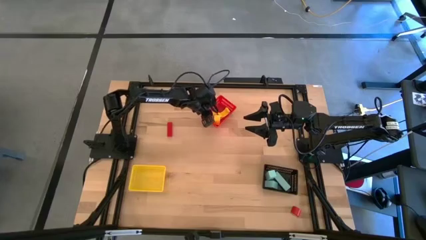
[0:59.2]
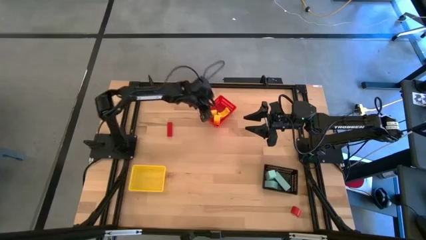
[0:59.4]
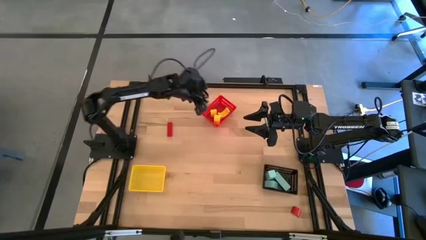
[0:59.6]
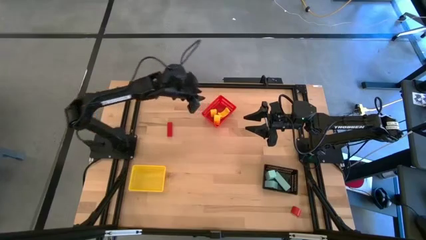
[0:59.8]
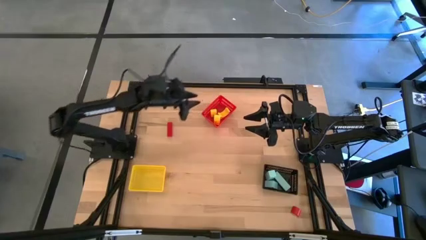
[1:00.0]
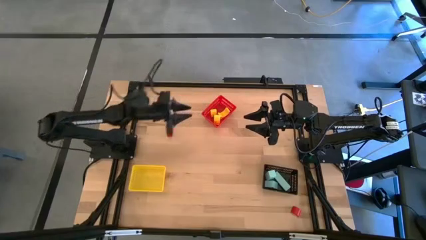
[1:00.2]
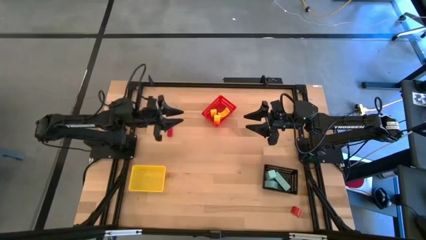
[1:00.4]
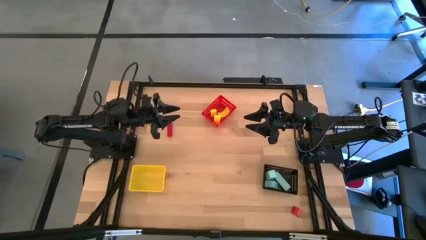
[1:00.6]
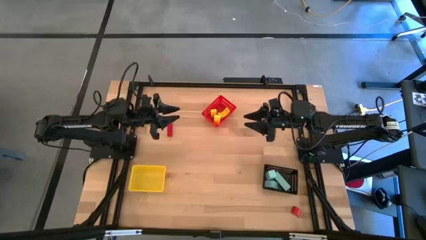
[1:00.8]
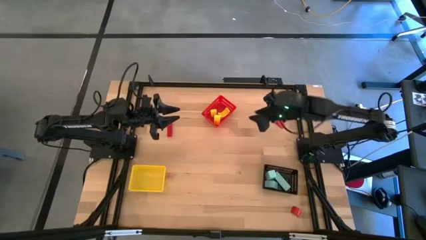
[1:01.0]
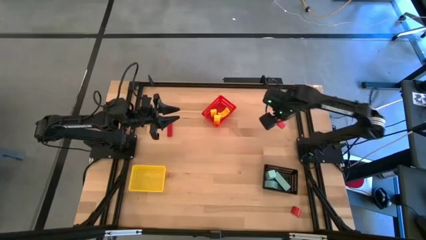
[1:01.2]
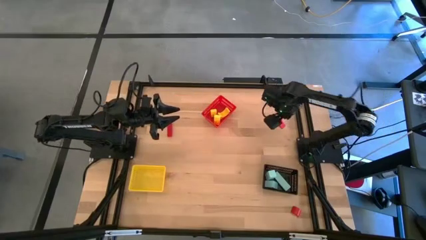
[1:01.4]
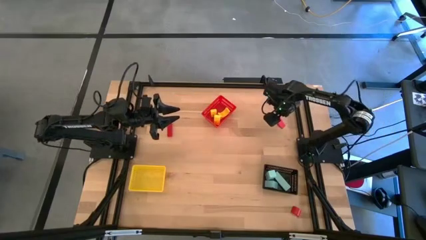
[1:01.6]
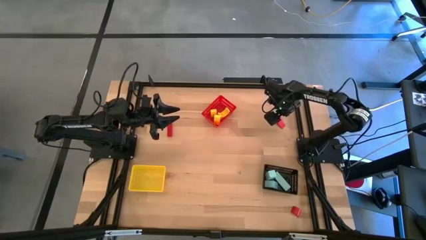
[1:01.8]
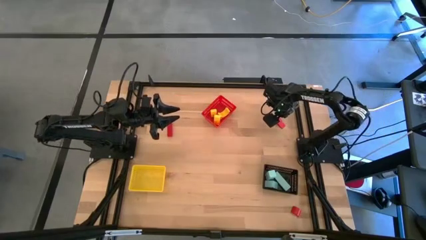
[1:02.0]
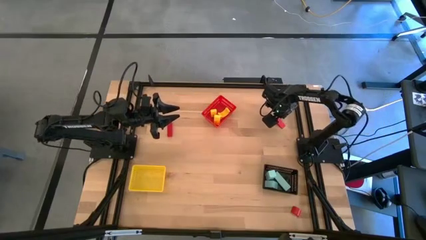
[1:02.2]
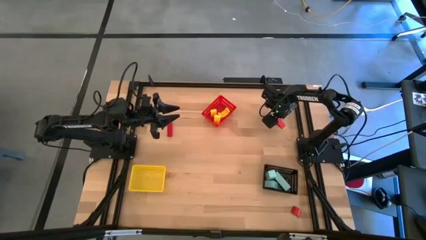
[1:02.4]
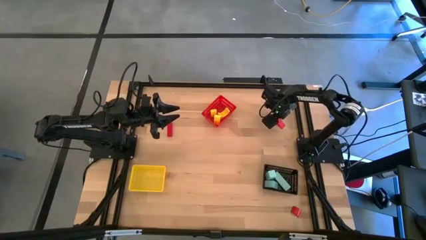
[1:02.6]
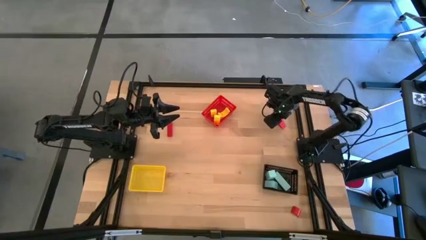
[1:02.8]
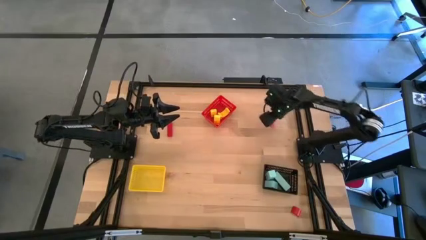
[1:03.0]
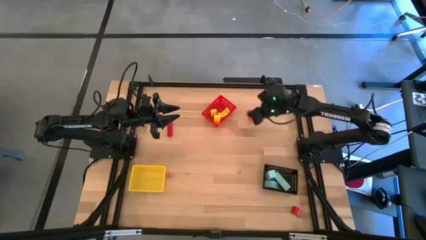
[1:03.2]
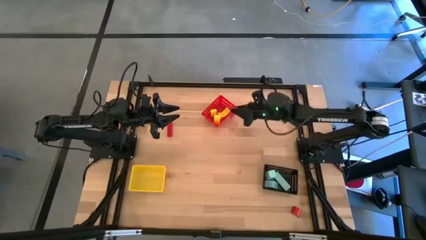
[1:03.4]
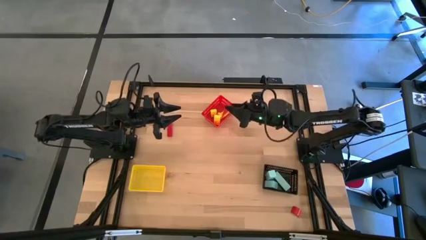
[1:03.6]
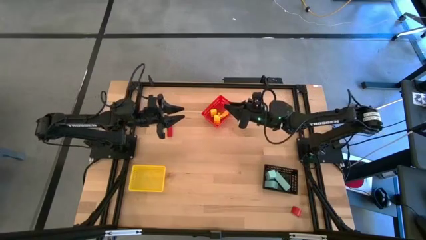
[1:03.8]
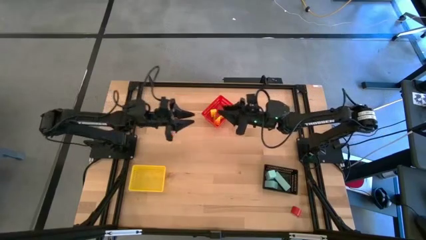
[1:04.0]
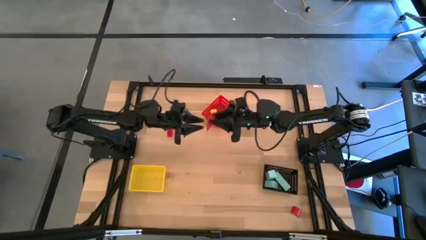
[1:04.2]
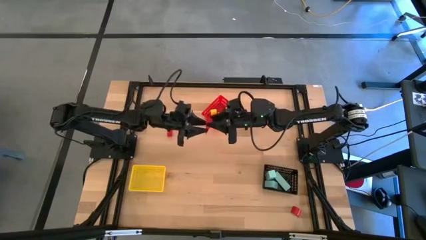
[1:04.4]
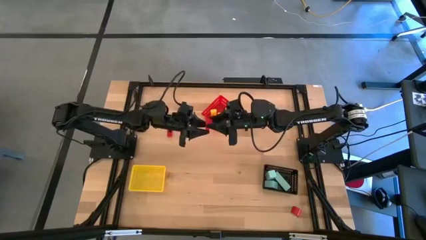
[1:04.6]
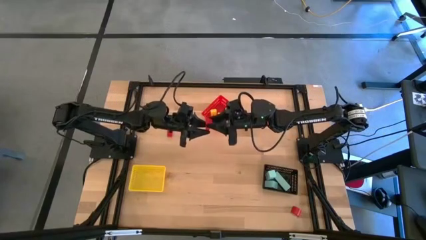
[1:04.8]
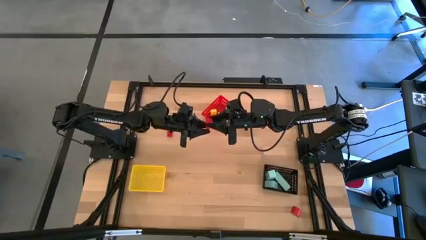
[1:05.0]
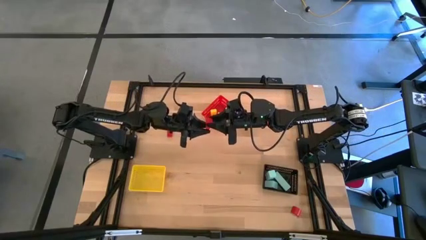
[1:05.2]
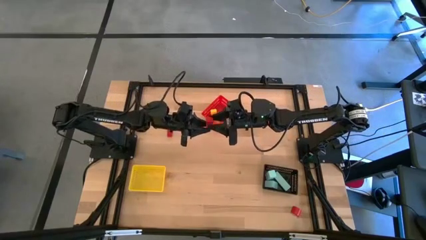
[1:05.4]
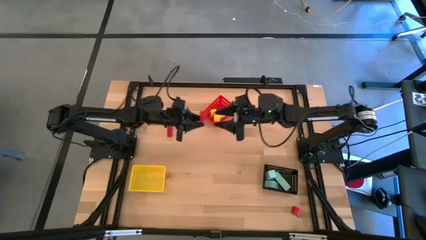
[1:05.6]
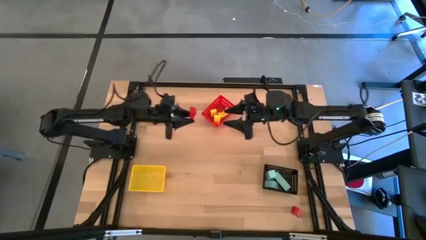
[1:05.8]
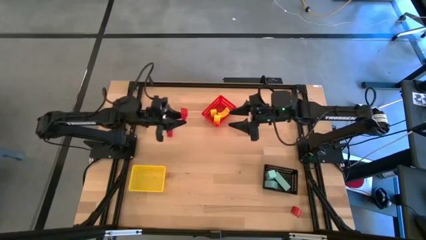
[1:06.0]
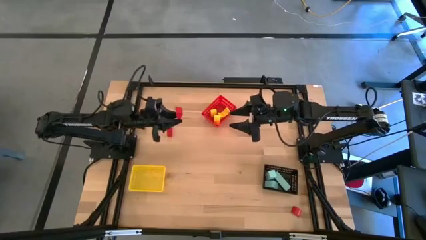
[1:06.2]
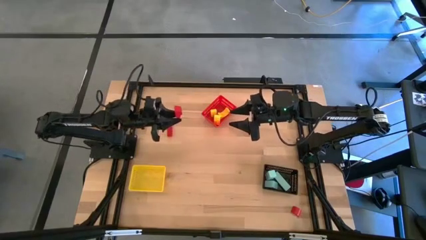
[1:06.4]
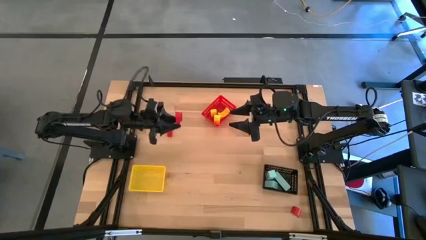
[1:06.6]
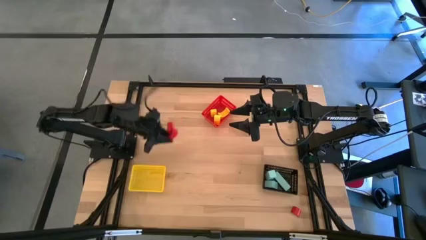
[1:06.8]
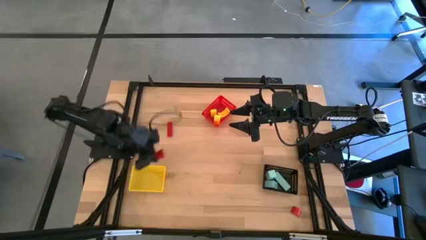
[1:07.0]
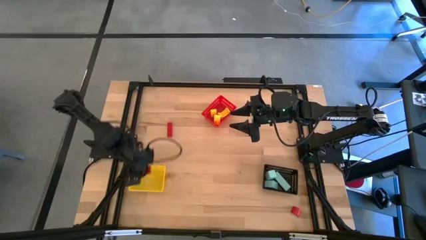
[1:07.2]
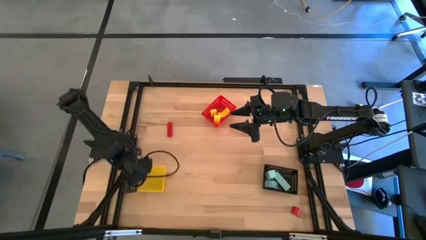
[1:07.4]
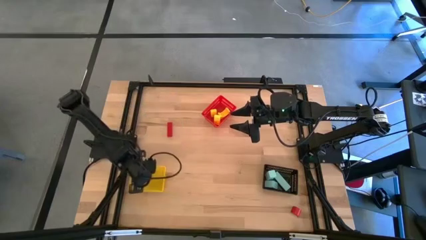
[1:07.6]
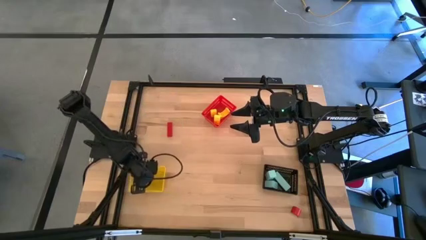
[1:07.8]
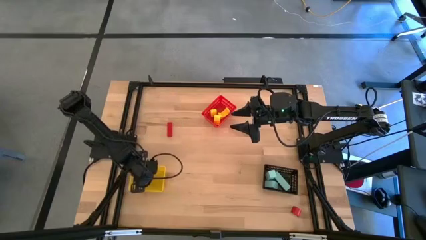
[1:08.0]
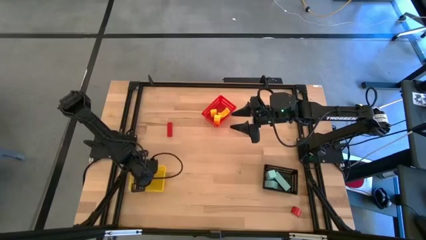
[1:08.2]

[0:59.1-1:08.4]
Task: Sort & place blocks by color
Put the top right red block into the yellow bin

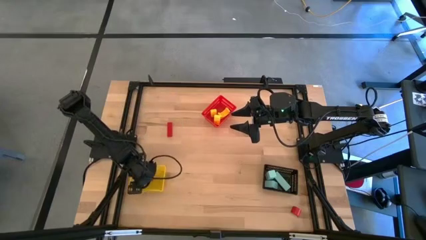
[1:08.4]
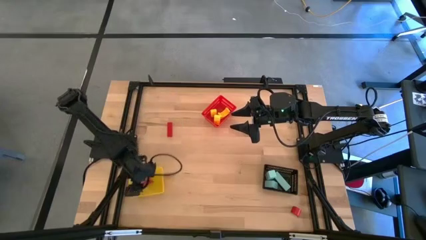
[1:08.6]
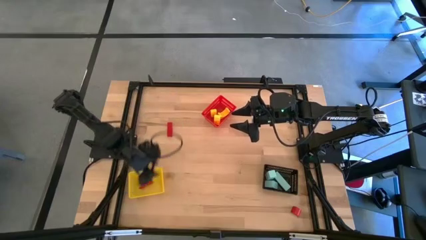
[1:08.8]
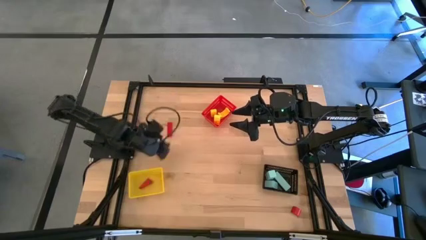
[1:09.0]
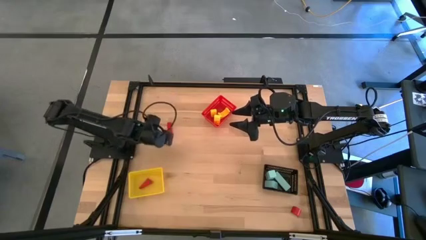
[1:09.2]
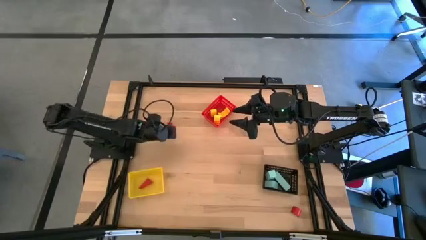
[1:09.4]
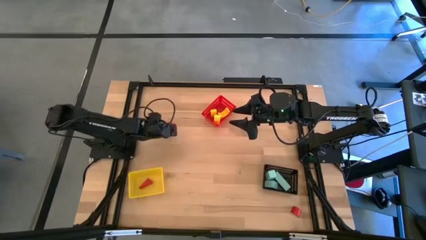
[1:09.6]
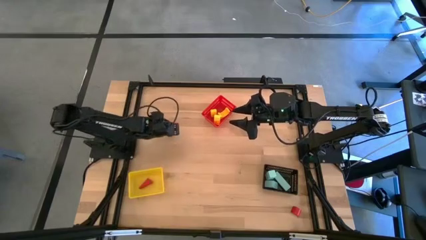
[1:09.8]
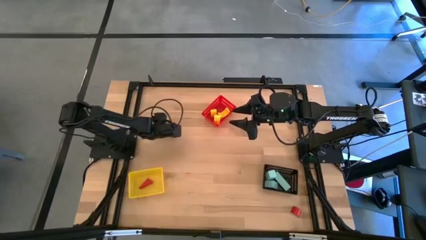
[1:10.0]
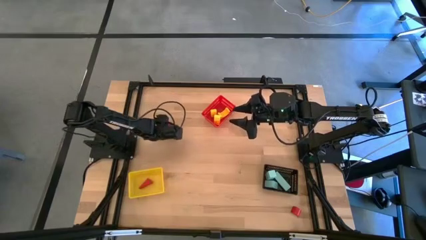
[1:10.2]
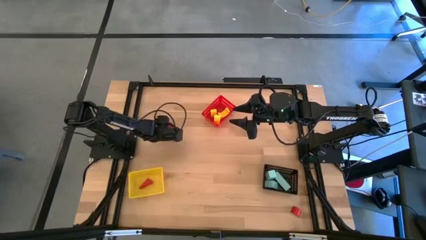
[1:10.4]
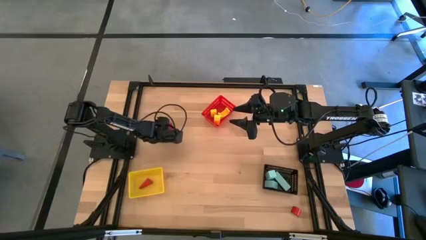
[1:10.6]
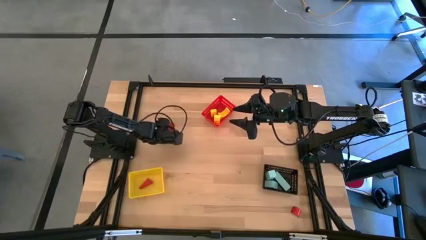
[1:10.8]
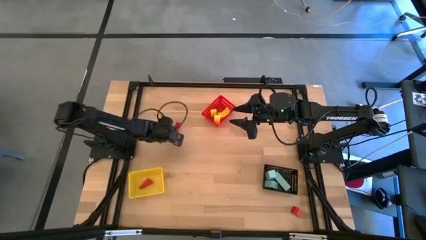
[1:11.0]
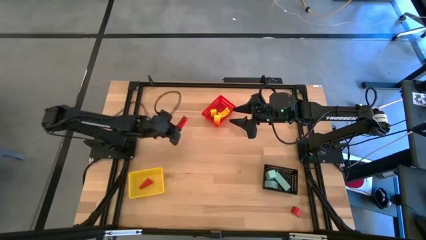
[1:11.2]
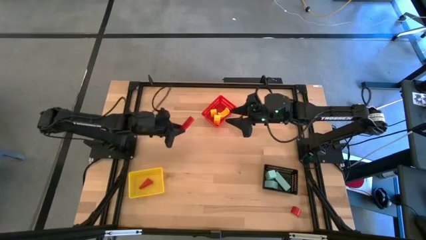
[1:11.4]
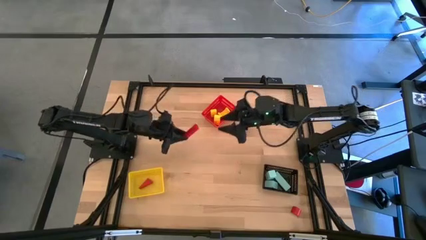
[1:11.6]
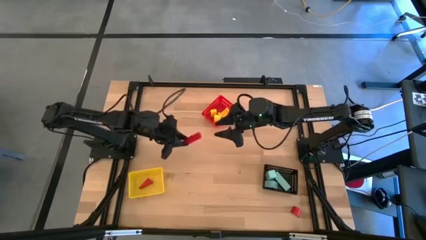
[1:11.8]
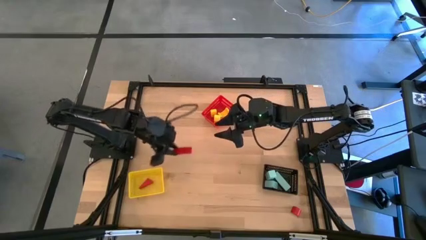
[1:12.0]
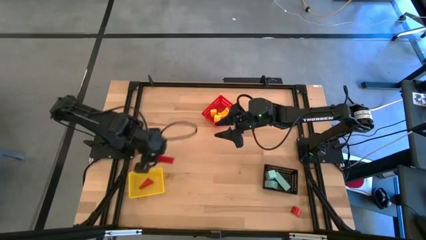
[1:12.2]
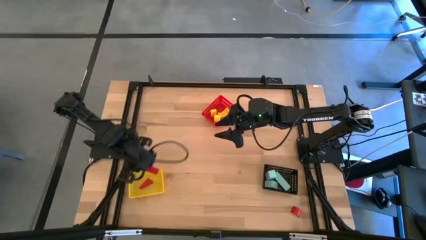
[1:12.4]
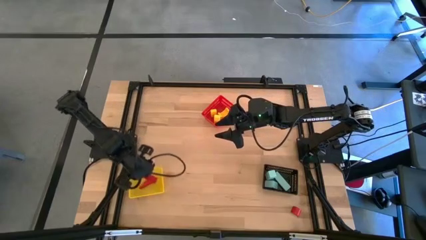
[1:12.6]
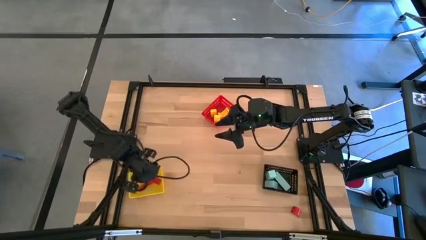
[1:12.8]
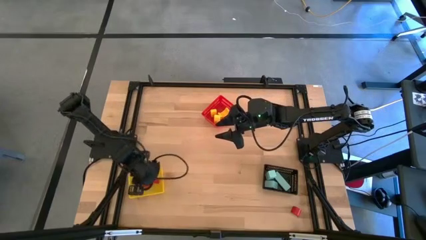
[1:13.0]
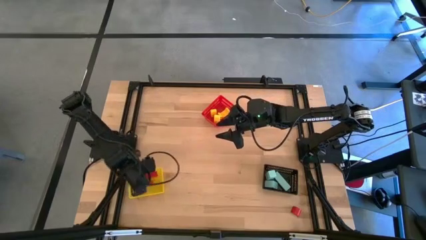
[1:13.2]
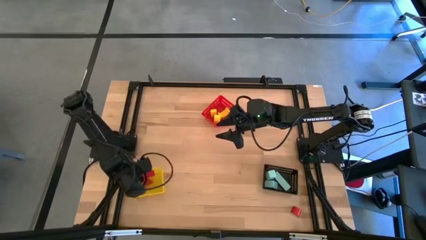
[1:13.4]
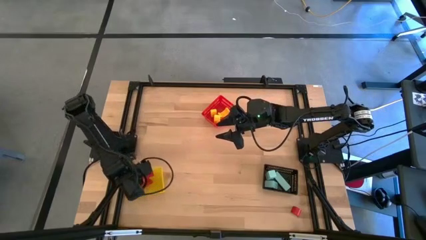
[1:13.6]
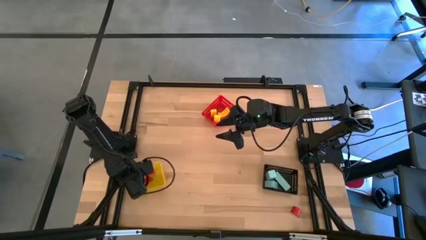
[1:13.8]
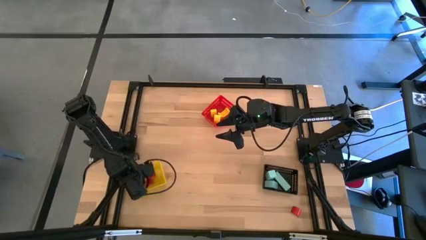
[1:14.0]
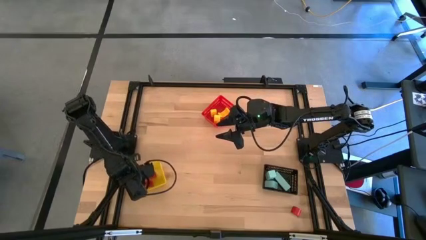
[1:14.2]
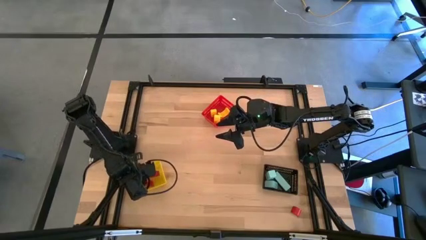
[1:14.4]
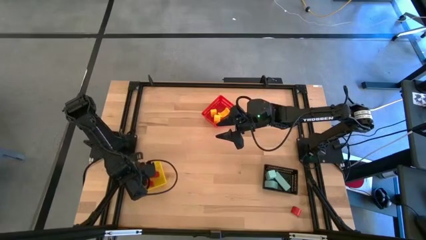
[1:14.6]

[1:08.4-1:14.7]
Put the top red block into the yellow bin

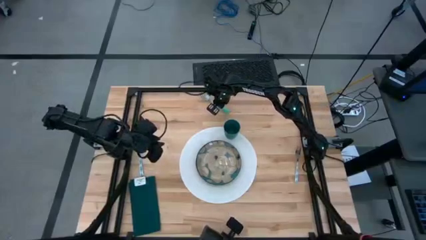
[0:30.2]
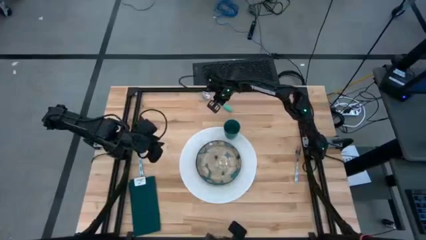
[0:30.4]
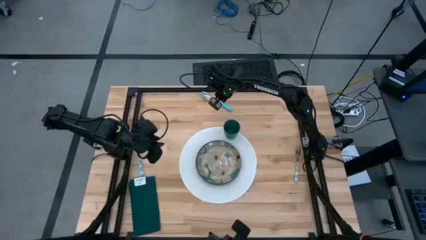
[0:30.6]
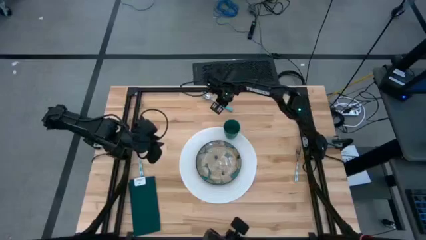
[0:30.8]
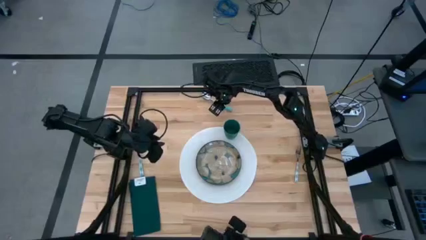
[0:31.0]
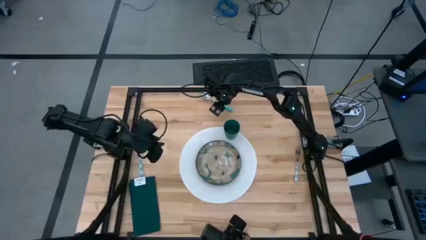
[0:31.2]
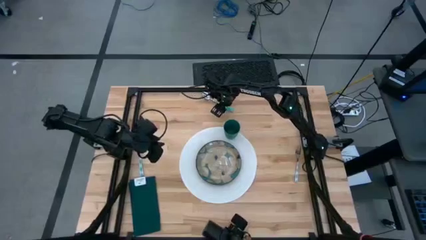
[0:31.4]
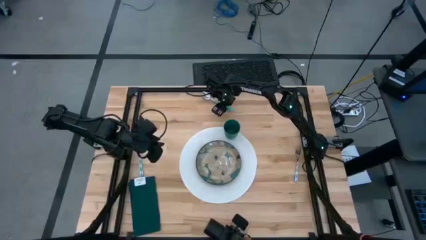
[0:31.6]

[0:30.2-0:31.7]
Task: Set table place
Put the blue spoon on the right side of the white table mat

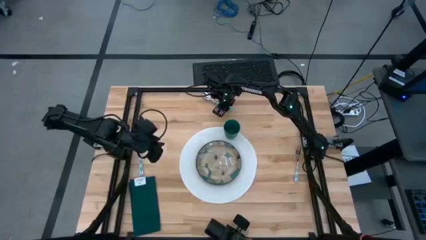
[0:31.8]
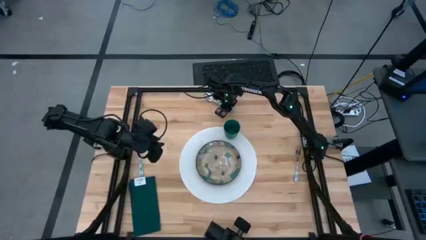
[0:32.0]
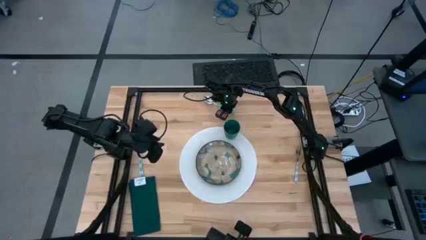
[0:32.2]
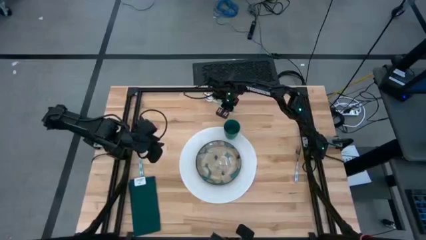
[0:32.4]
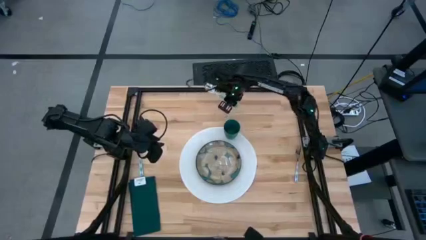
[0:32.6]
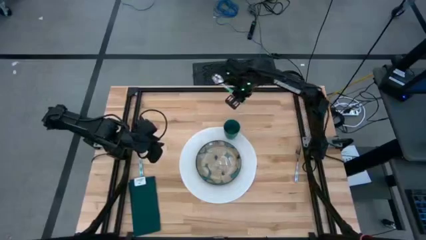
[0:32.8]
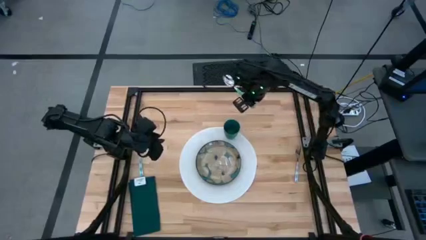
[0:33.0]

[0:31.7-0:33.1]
Put the blue spoon on the right side of the white table mat
